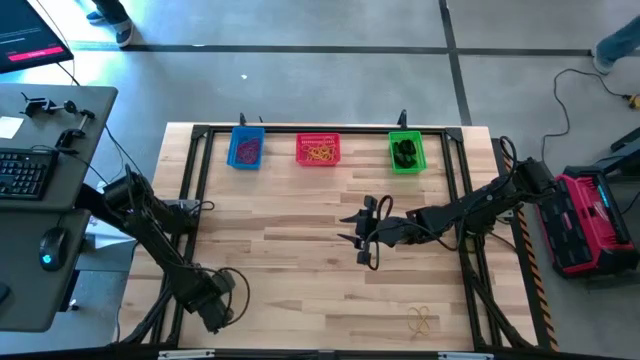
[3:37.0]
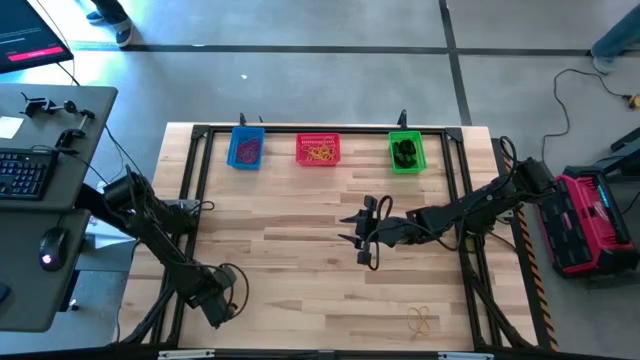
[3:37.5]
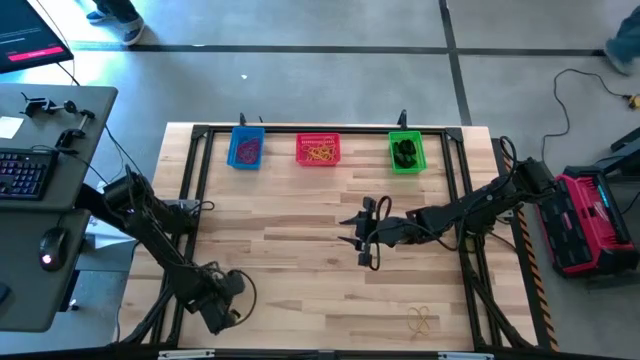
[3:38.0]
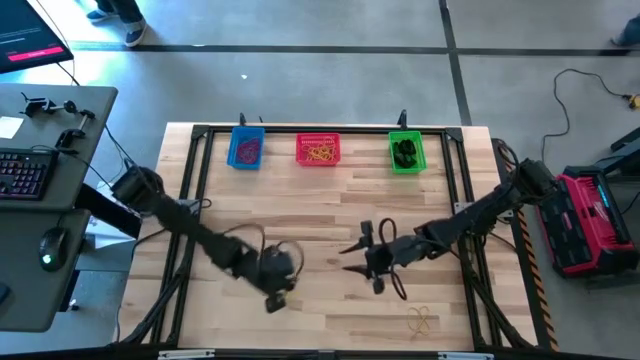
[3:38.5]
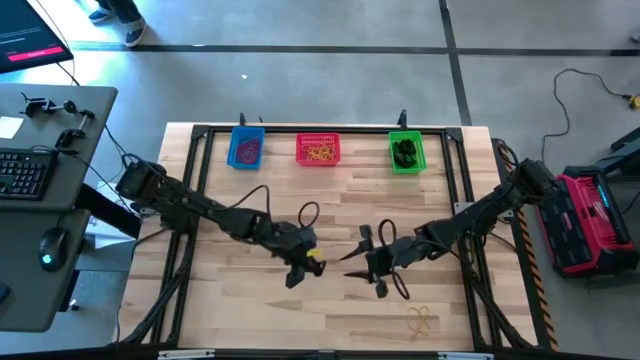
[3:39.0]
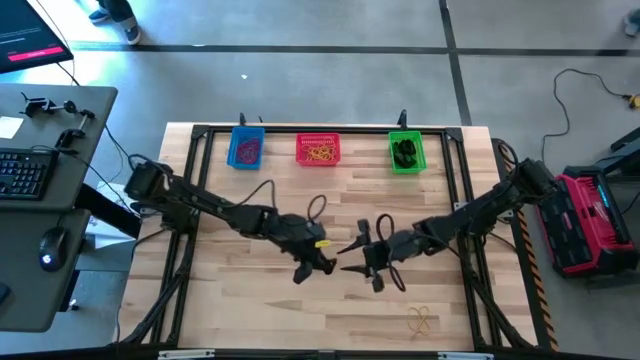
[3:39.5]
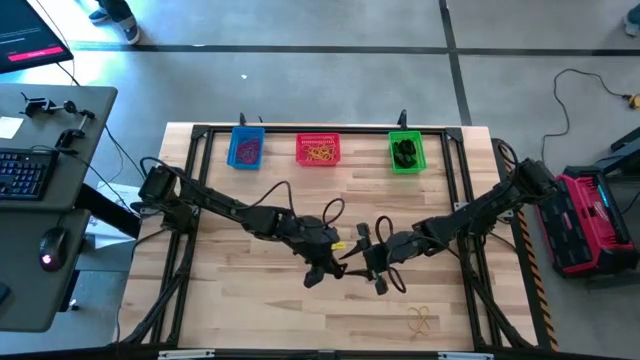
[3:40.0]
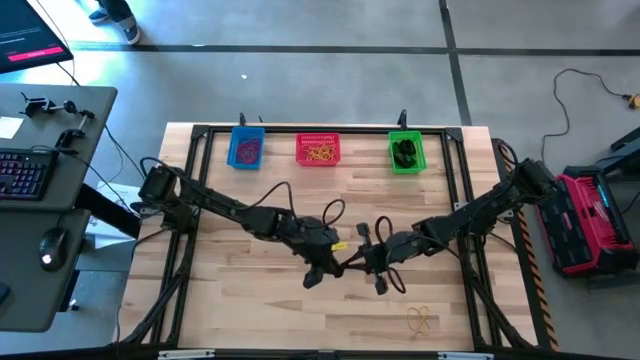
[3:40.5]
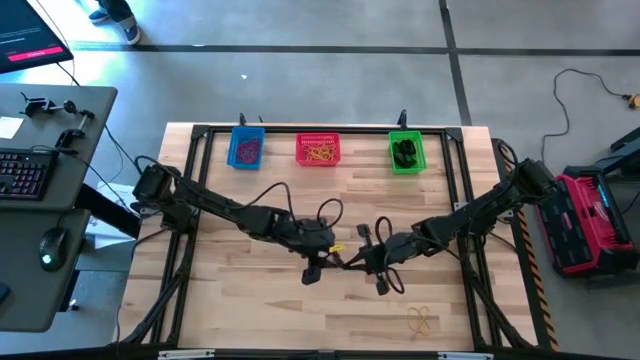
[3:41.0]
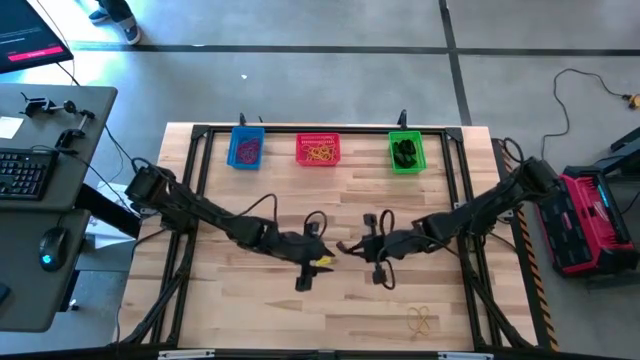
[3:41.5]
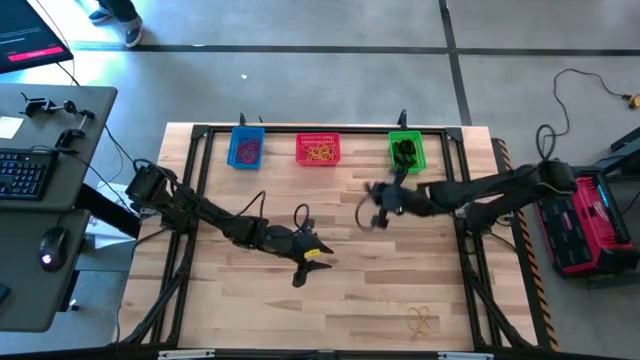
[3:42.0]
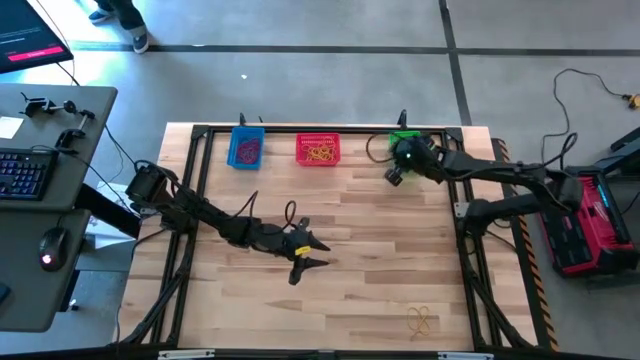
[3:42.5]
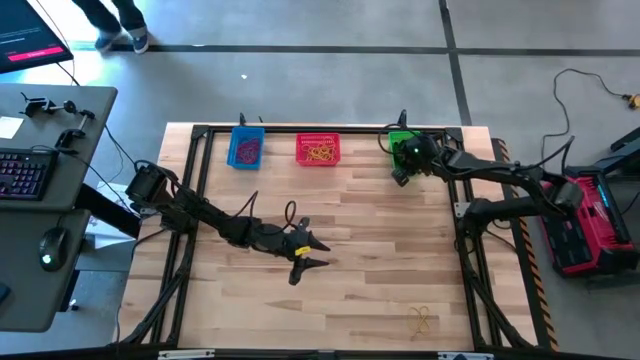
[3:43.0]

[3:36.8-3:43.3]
Task: Sort rubber bands into baskets
Put the black rubberband into the green bin

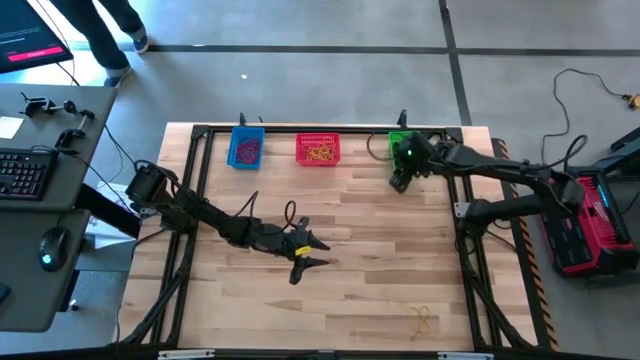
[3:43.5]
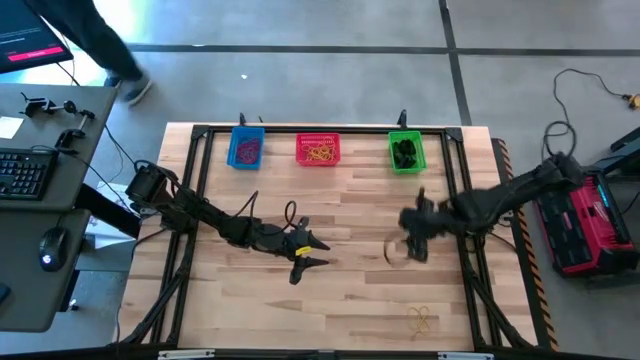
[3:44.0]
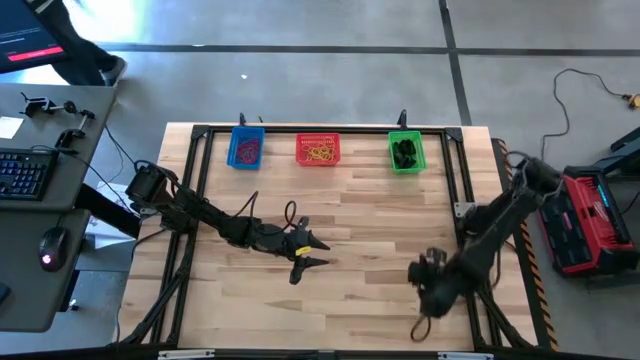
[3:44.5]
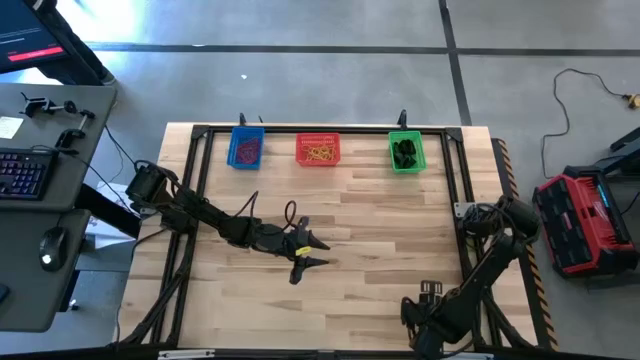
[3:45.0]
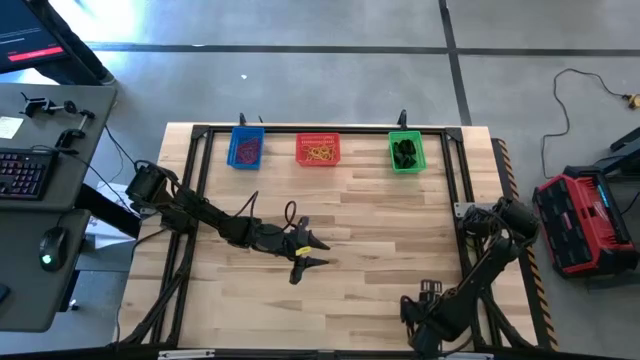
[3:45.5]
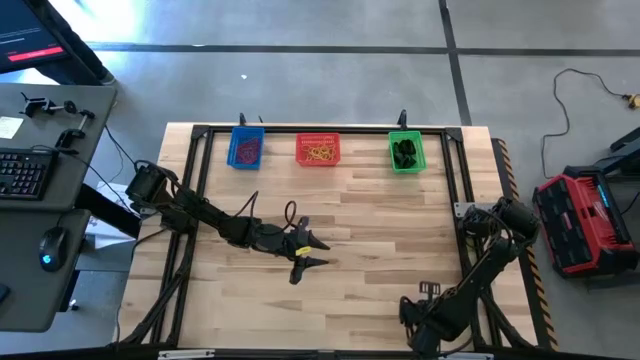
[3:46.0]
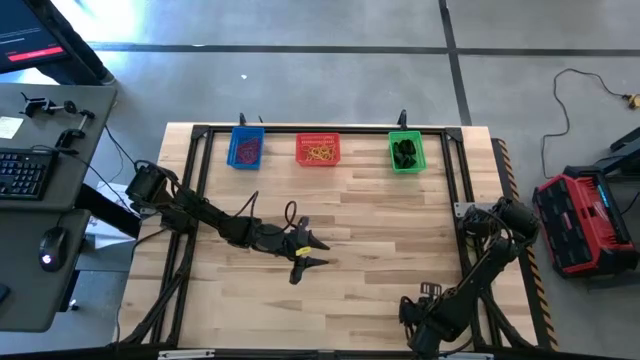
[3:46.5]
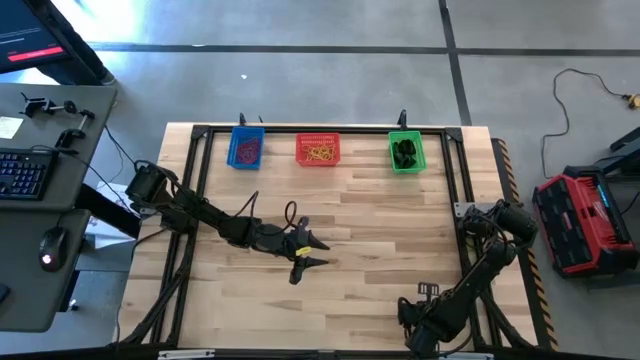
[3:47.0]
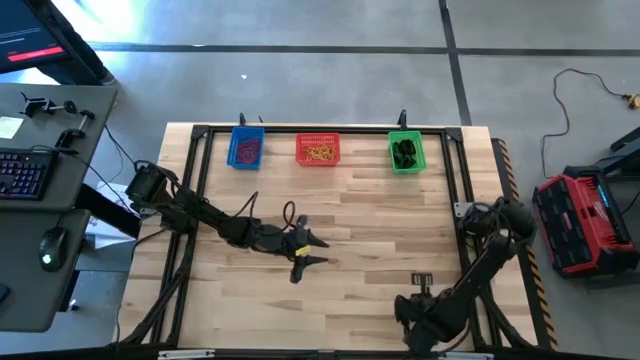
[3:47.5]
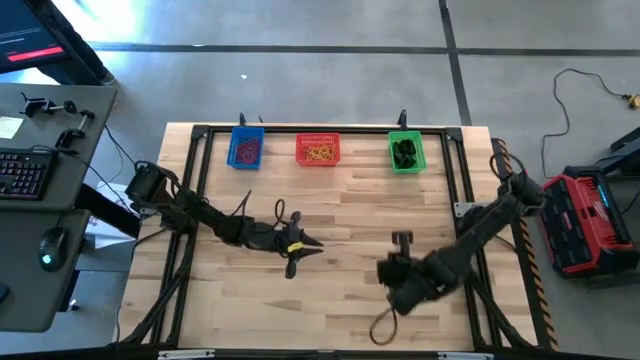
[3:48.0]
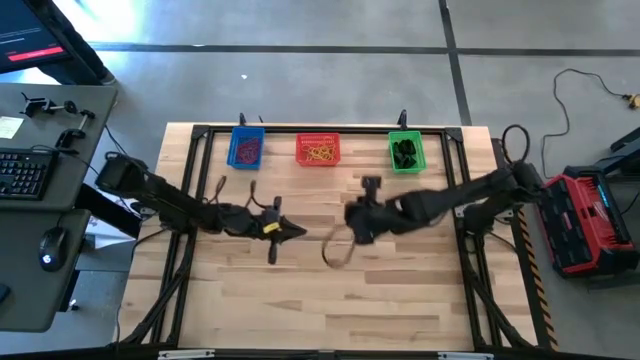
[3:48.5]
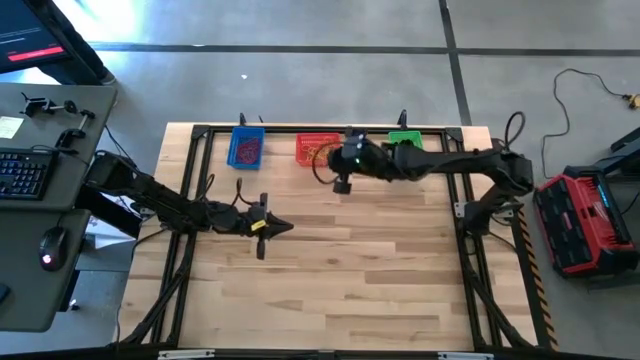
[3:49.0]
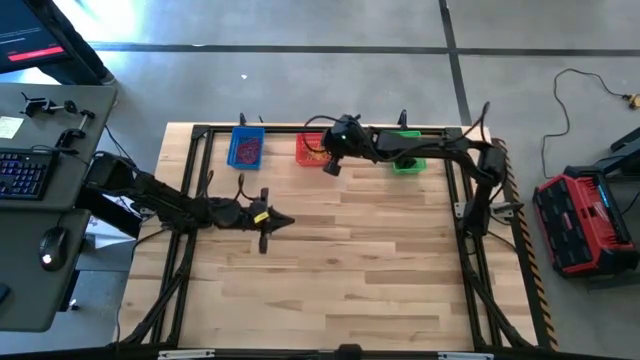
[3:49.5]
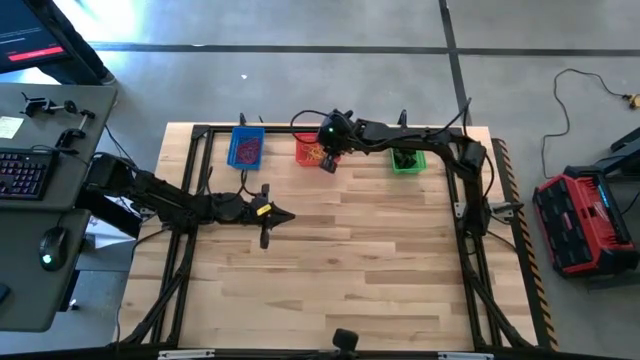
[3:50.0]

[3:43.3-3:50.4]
Put the yellow rubberband into the orange bin

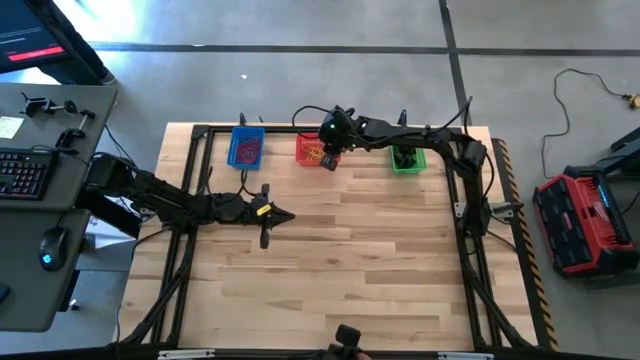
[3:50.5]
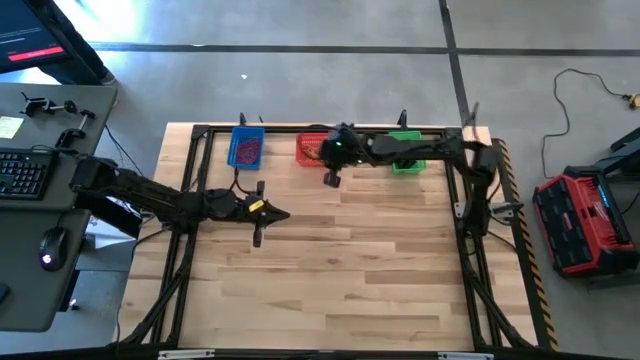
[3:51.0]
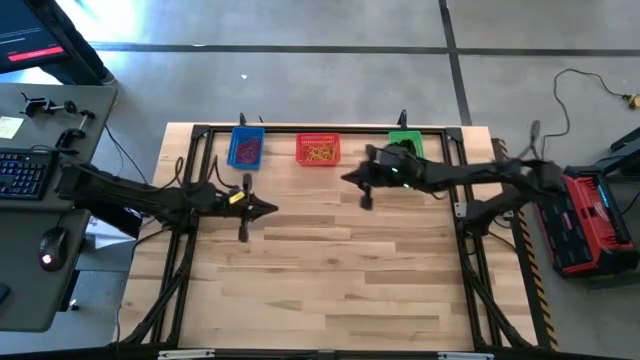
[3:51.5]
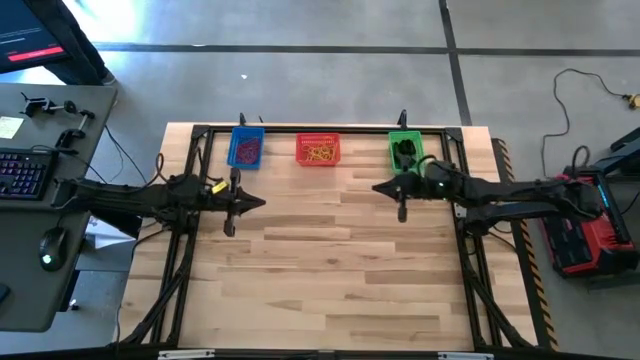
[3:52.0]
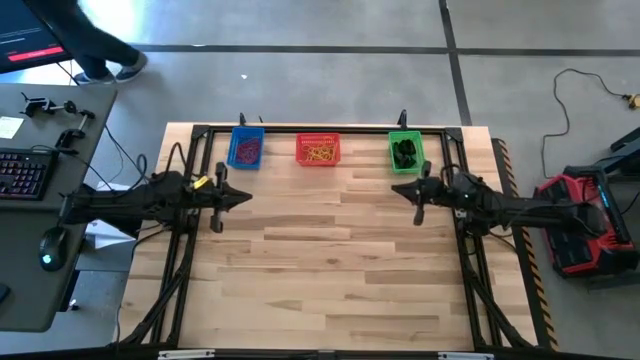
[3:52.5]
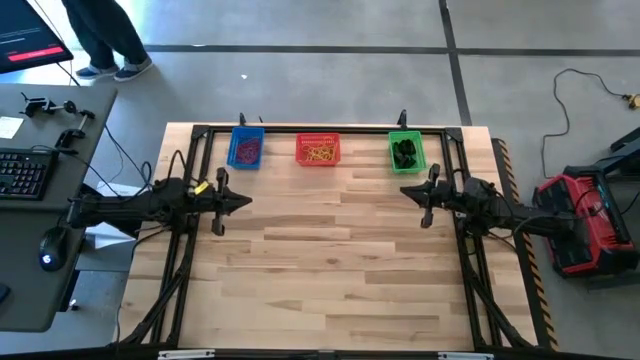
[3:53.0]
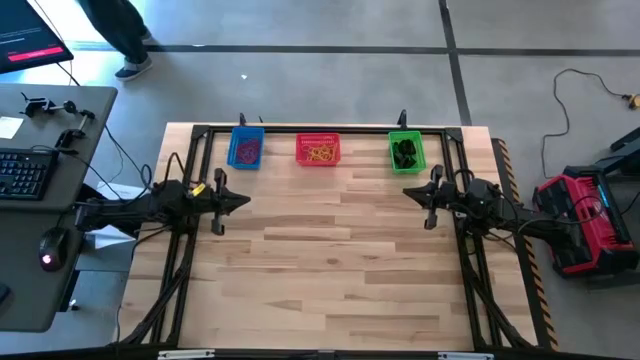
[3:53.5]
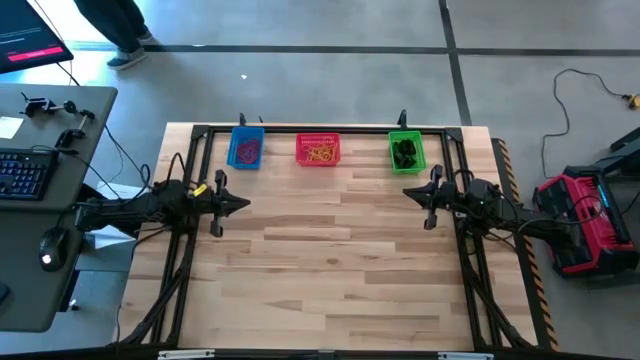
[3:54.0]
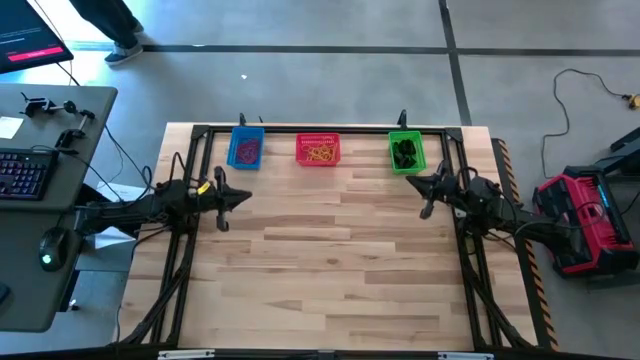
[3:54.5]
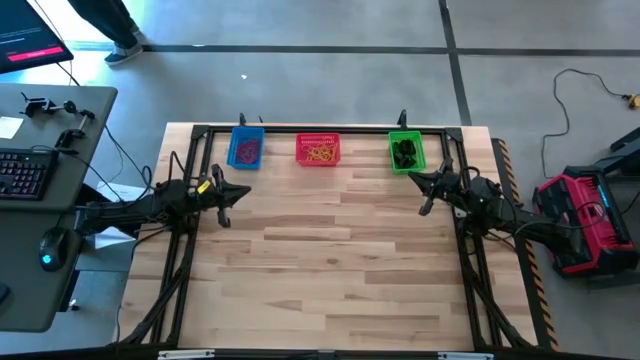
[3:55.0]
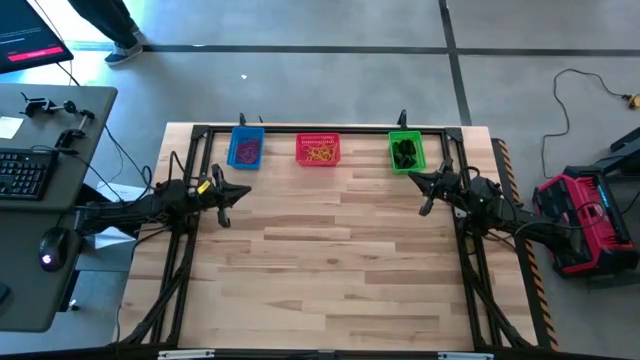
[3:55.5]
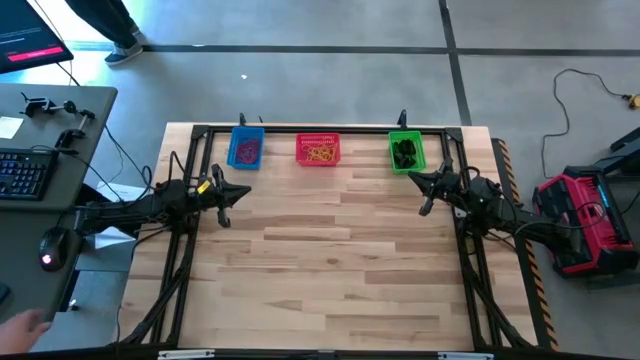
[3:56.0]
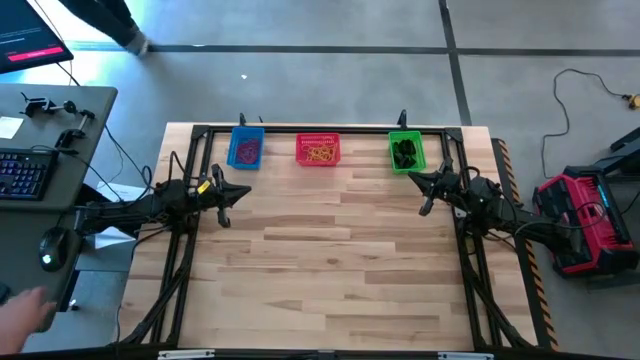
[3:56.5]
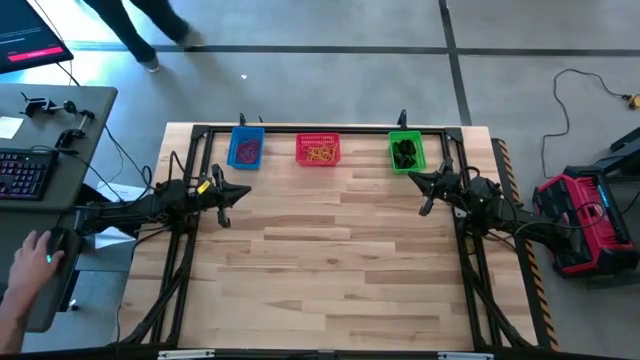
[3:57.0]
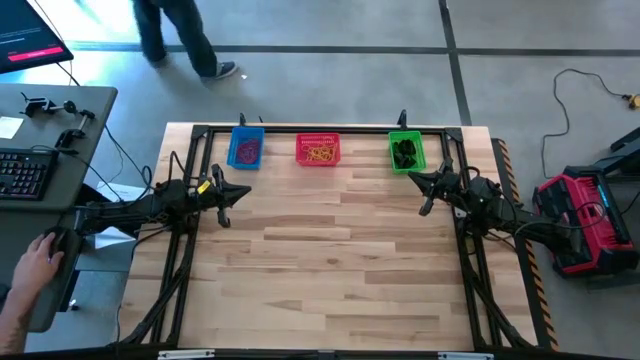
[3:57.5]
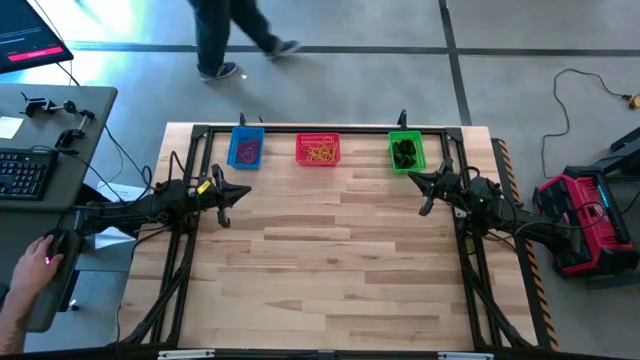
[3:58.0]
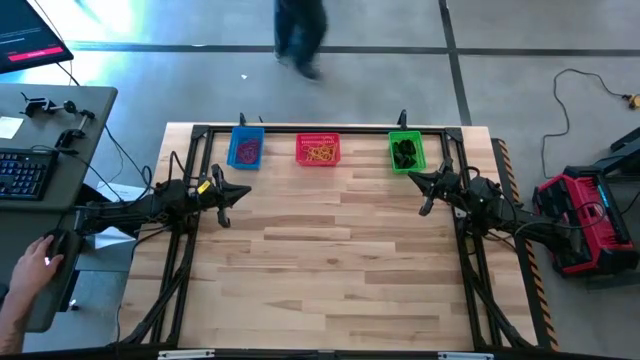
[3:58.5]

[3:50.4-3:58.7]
Return to Home Position
